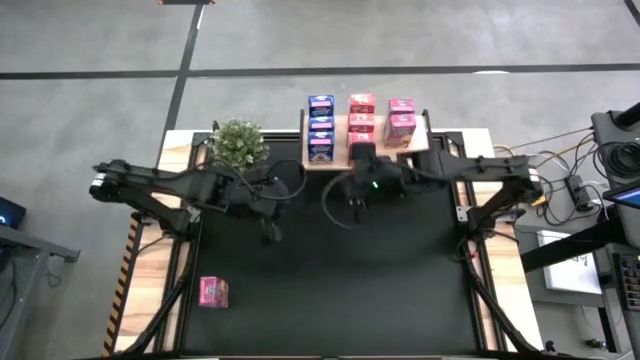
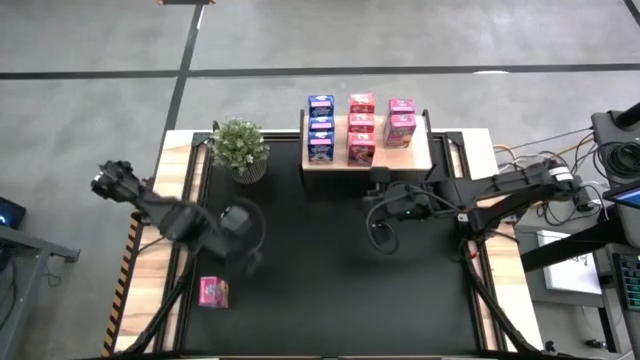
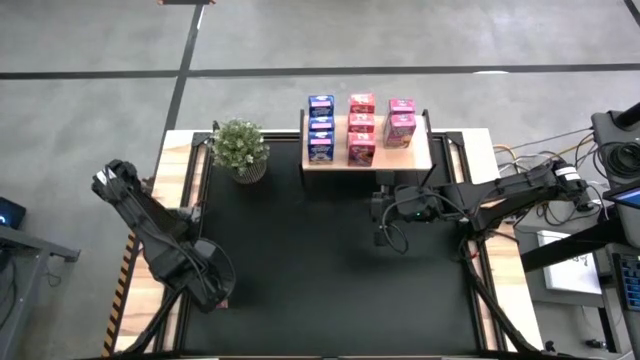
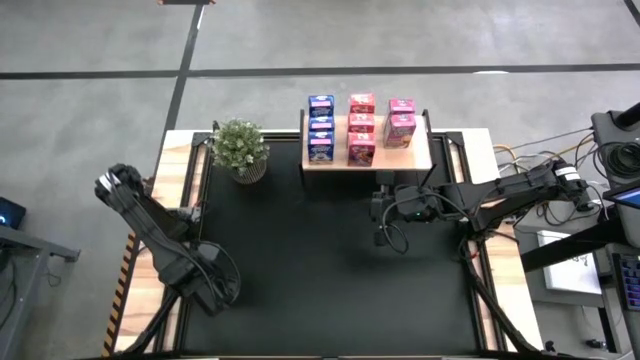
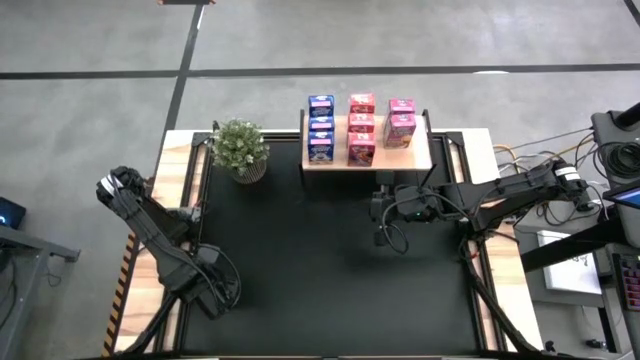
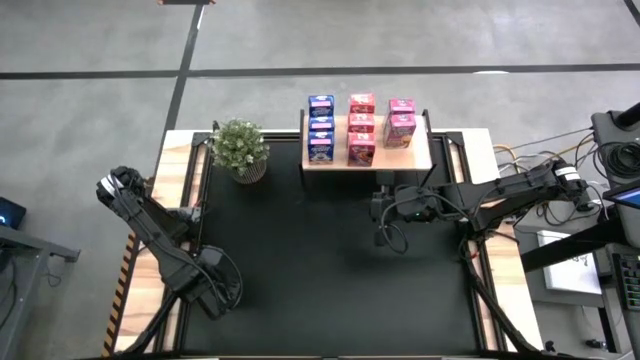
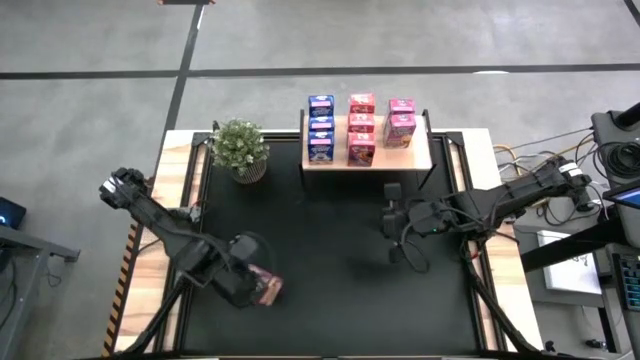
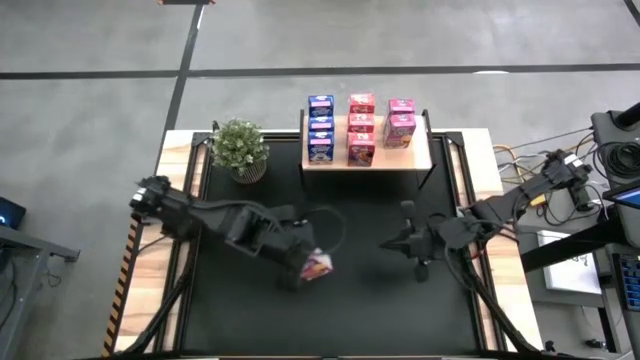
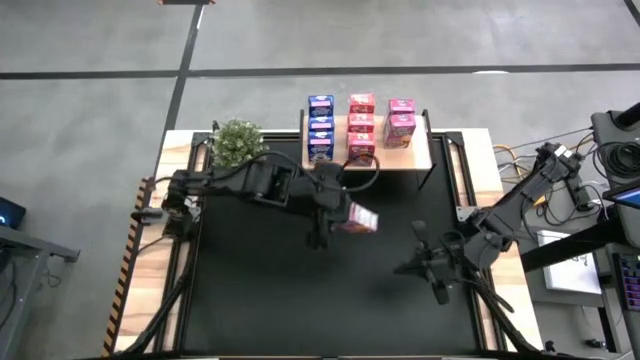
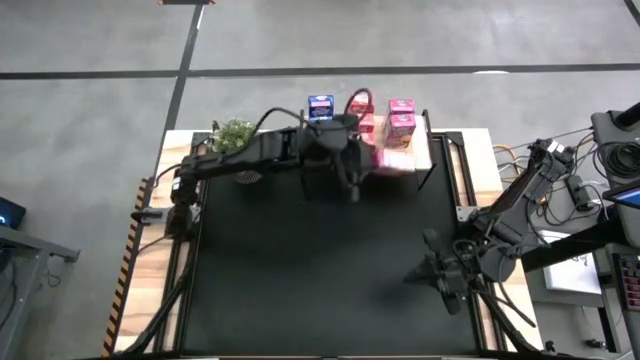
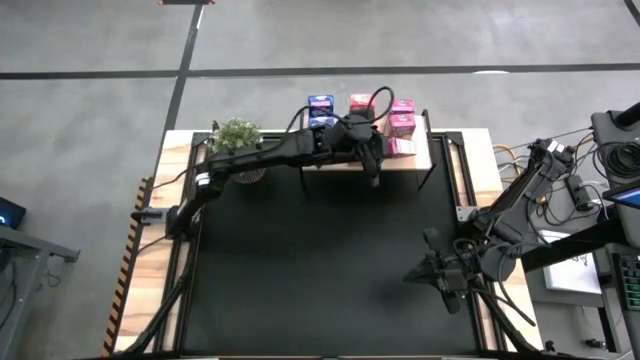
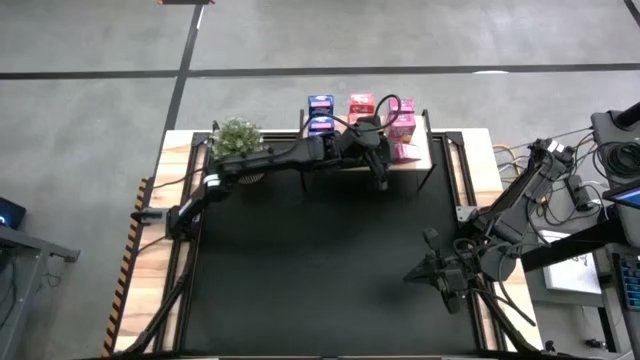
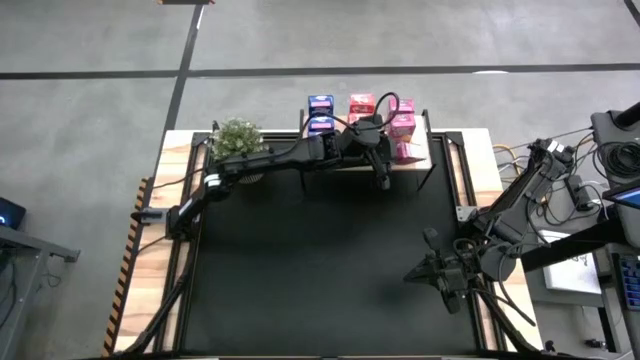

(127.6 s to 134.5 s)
Task: Stack cereal on shelf
Put the purple cereal box on the shelf and align it with the other purple cereal boxes on the shelf

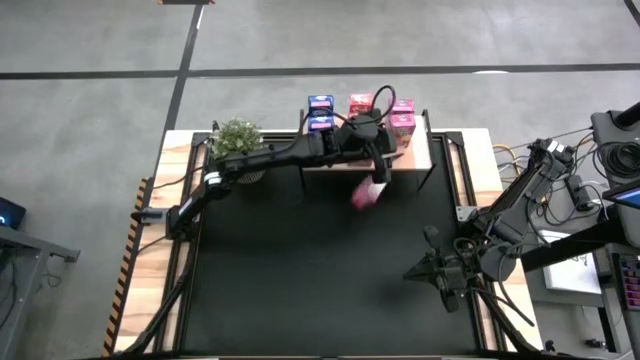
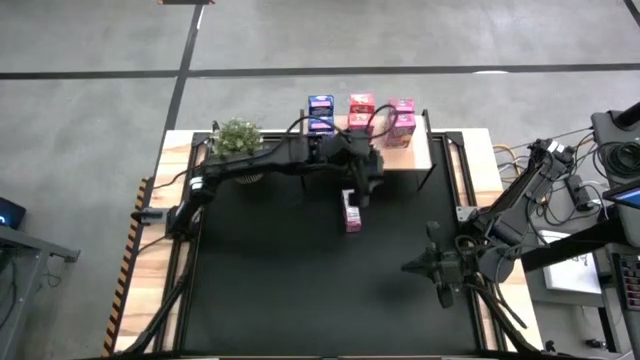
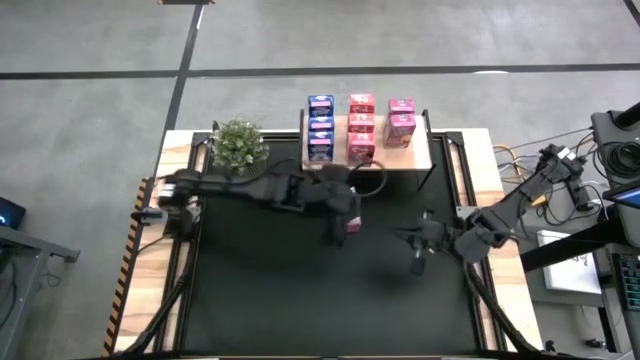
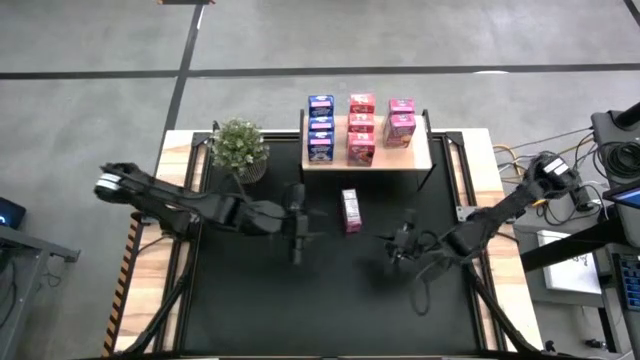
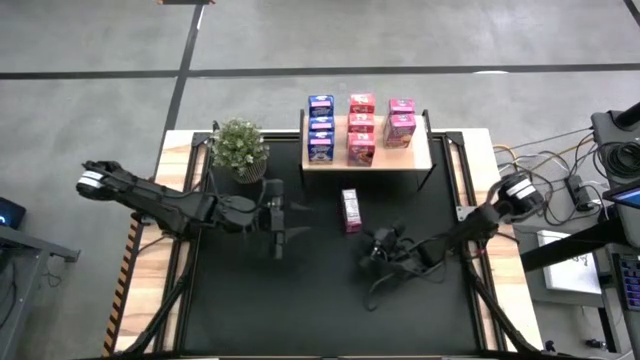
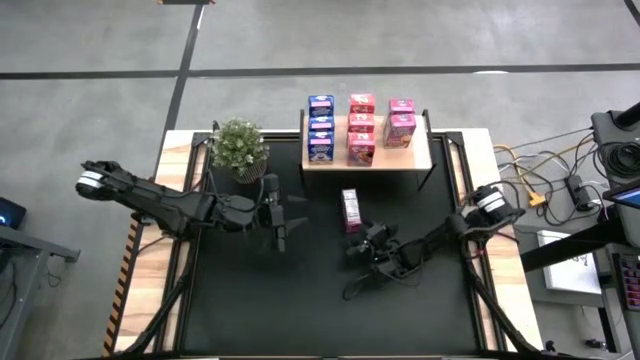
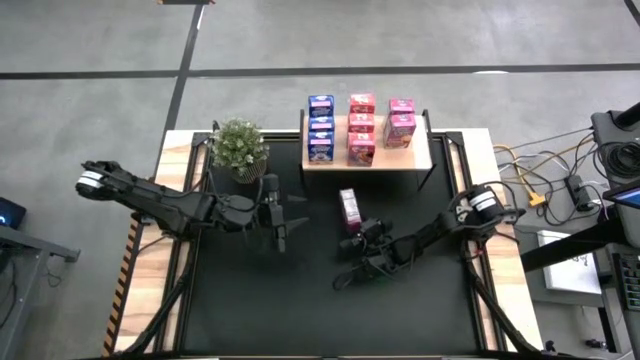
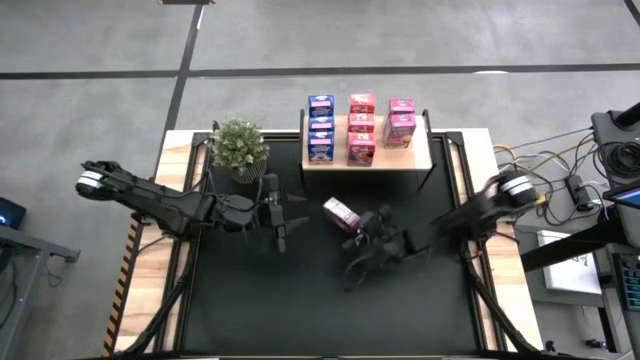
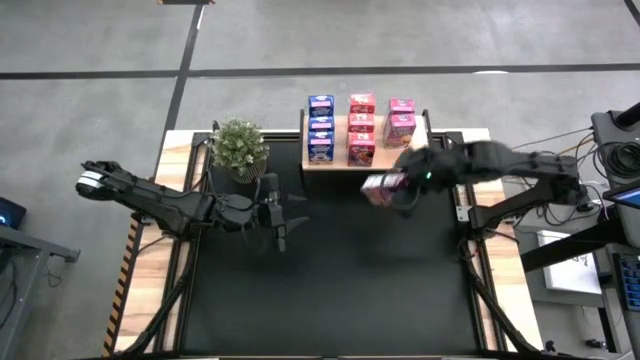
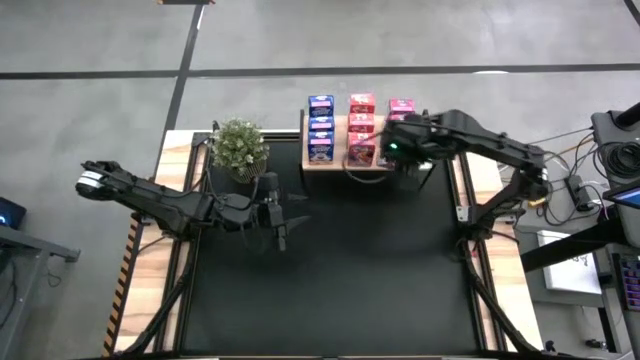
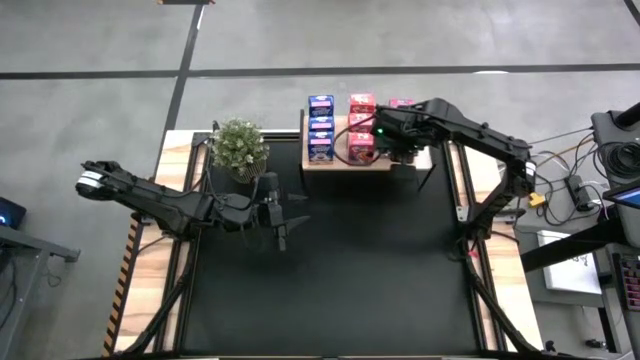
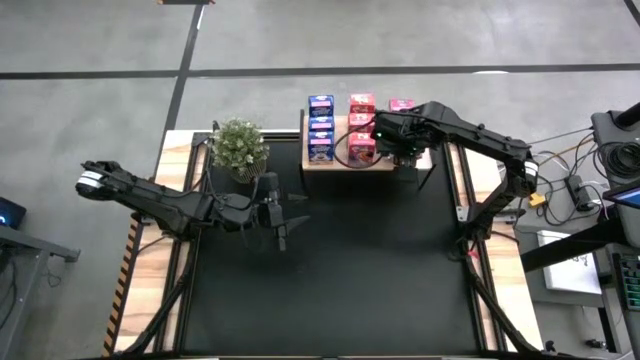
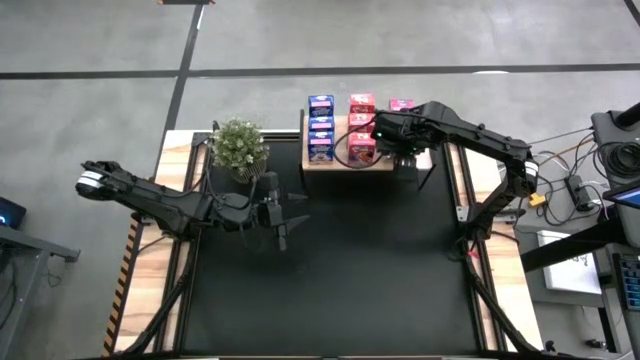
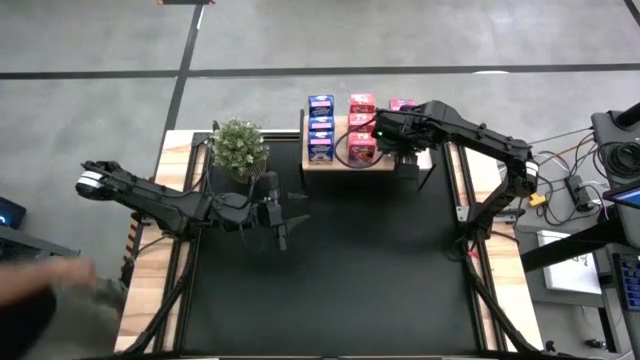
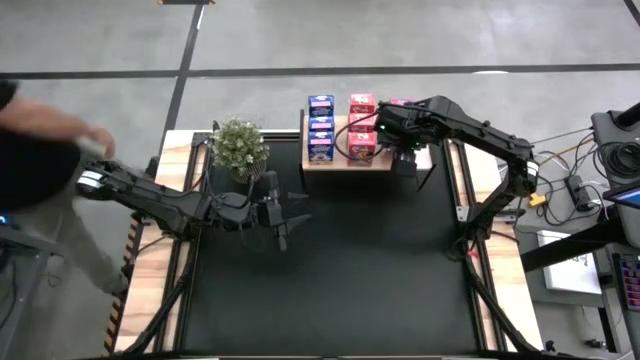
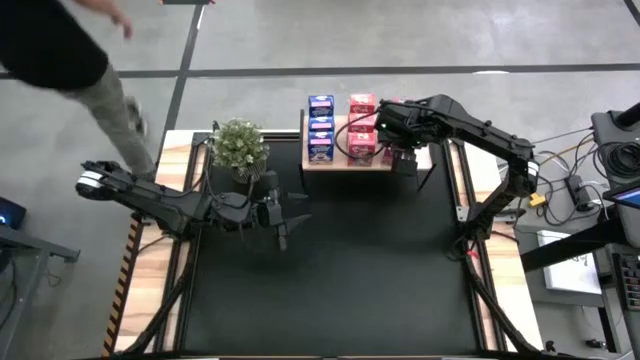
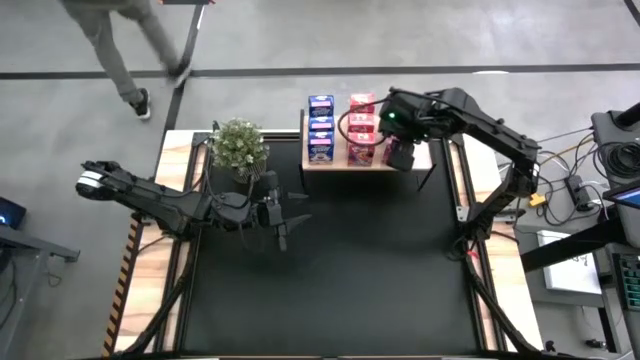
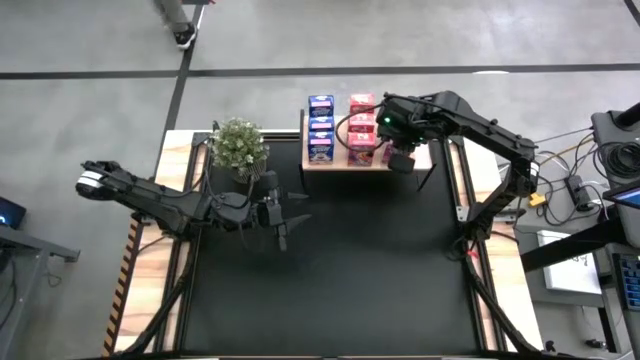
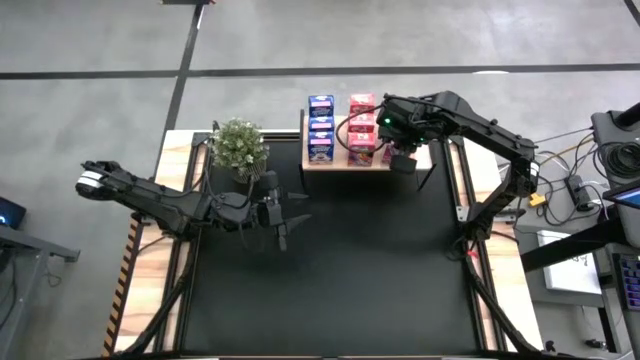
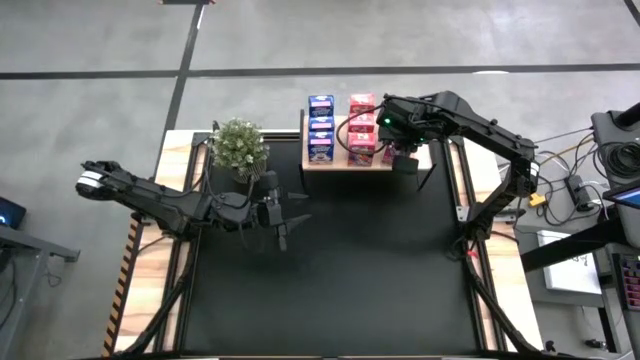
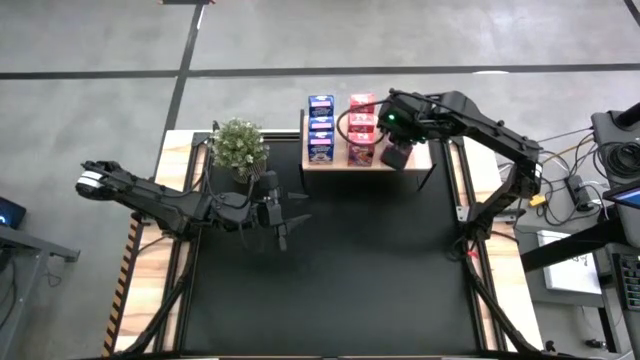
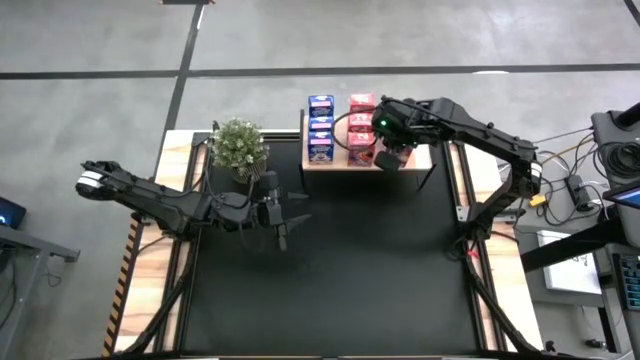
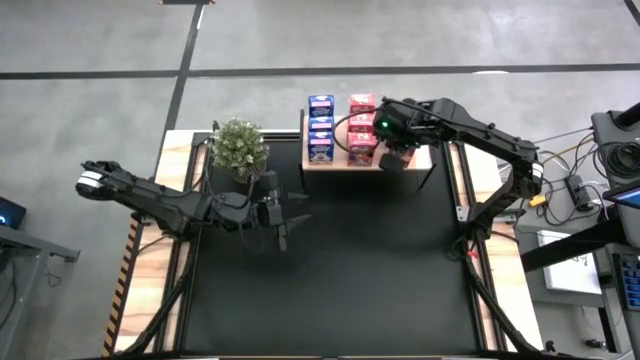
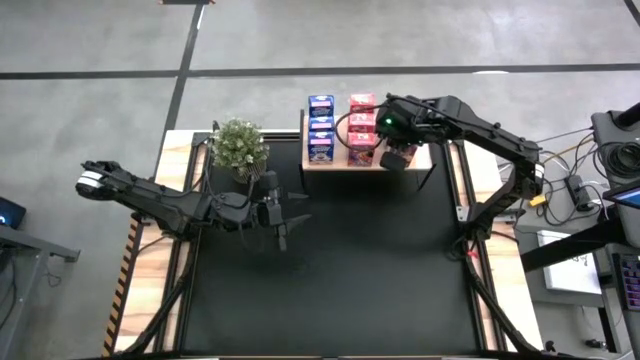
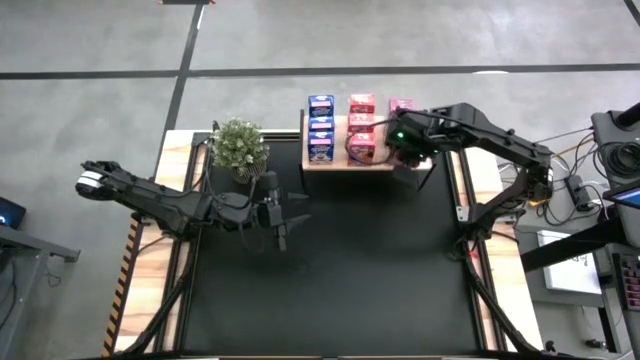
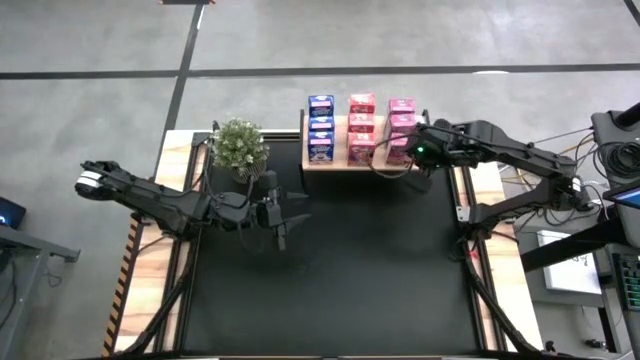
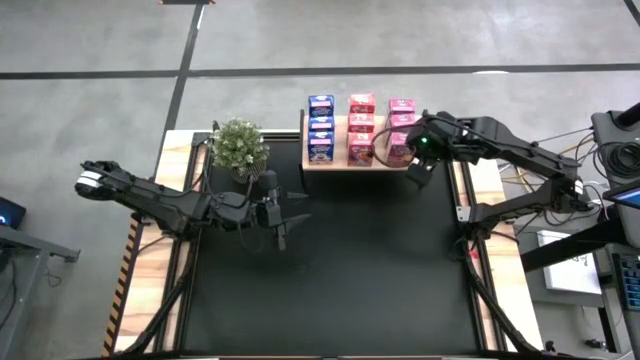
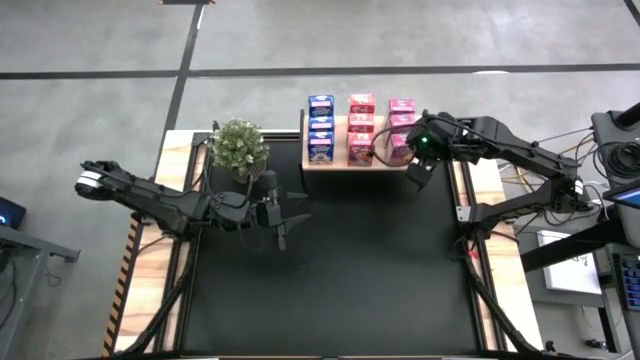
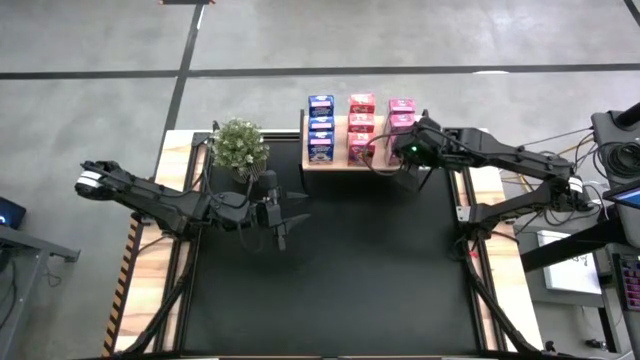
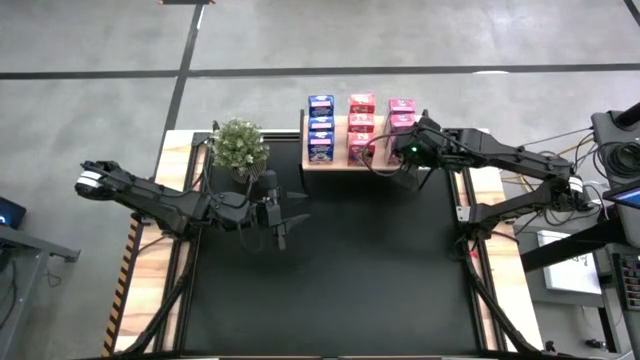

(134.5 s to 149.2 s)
Put the purple cereal box on the shelf and align it with the other purple cereal boxes on the shelf

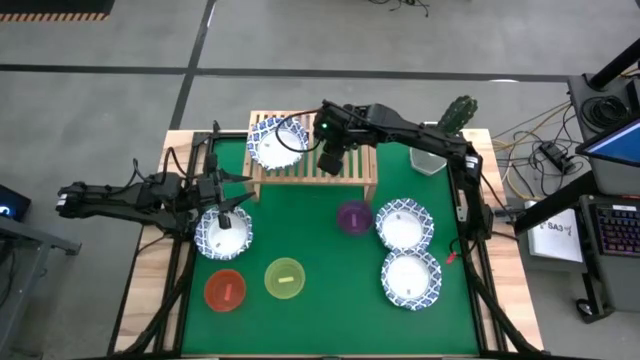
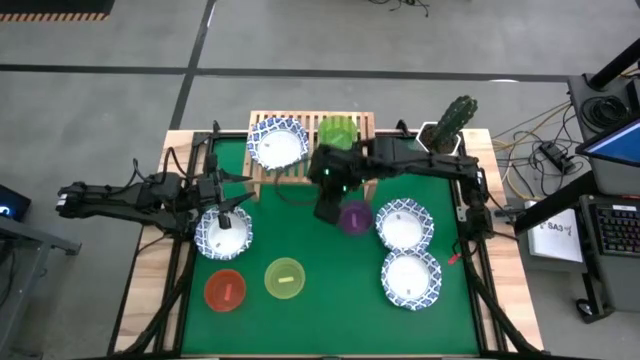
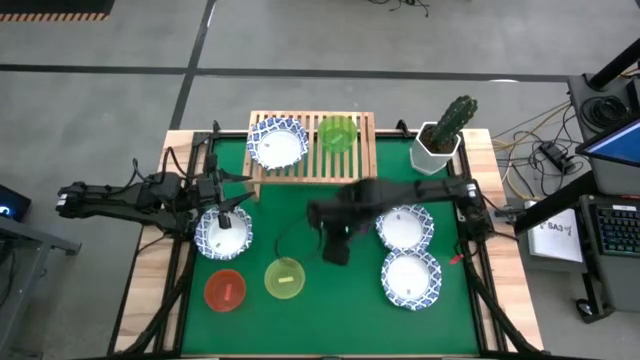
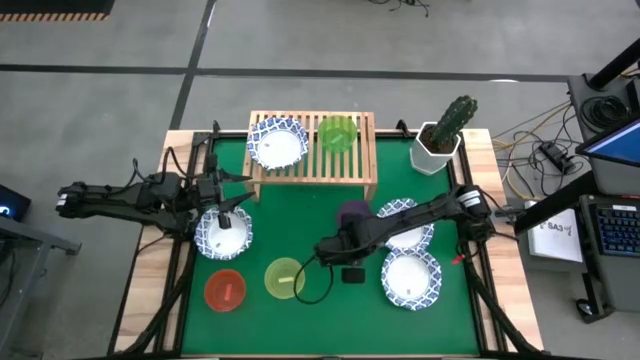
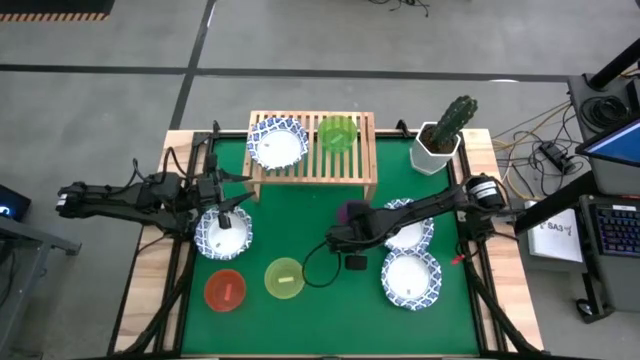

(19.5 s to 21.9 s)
Task: Place and stack bowls onto a shelf
Stack the purple bowl on top of the green bowl on the shelf
